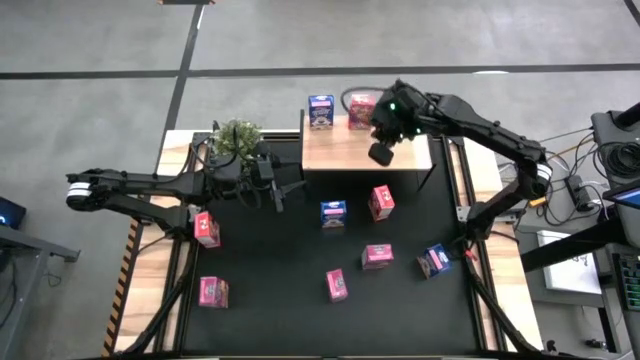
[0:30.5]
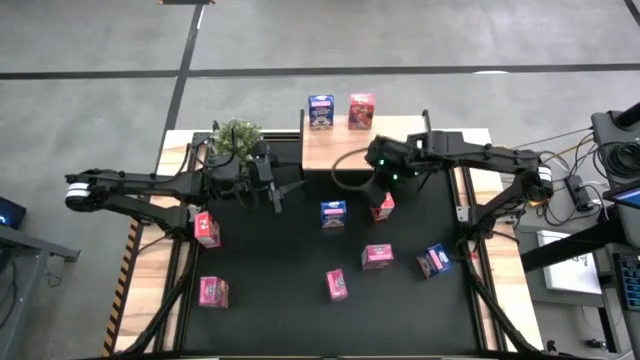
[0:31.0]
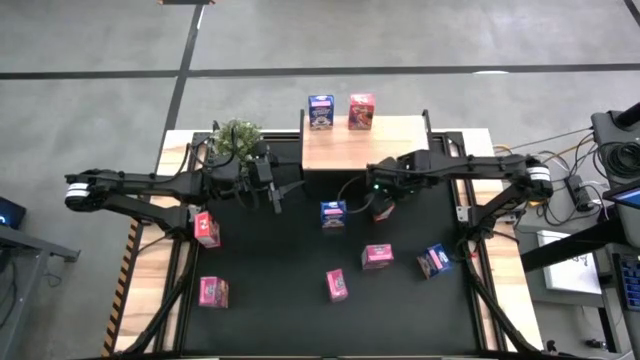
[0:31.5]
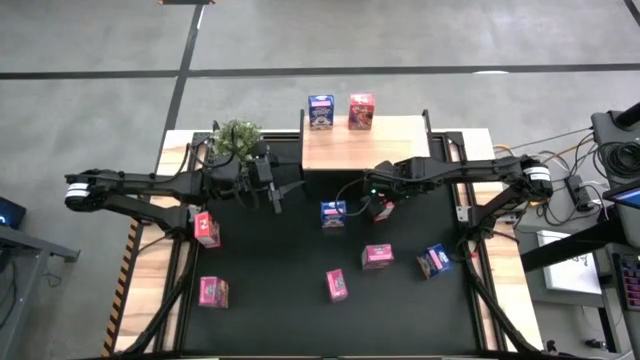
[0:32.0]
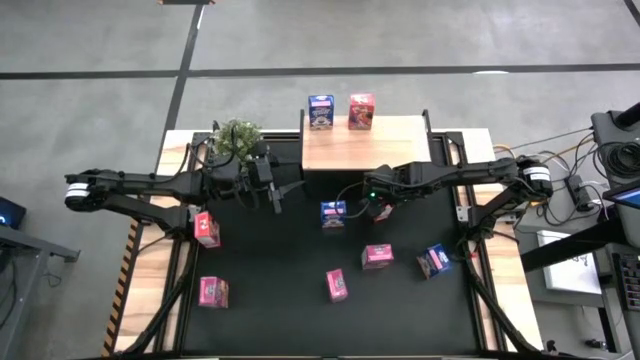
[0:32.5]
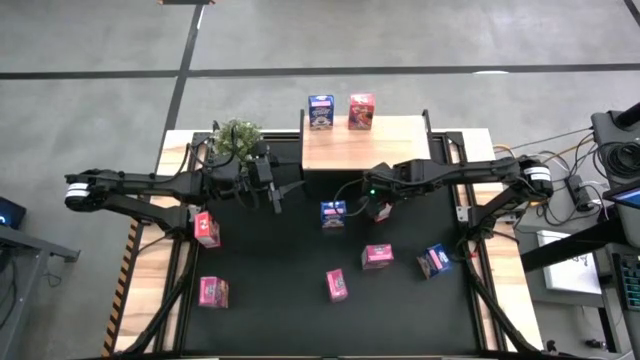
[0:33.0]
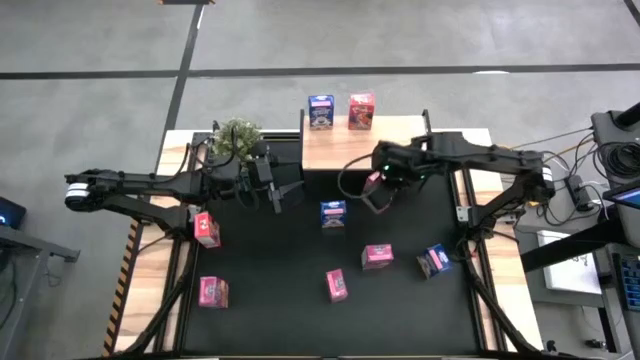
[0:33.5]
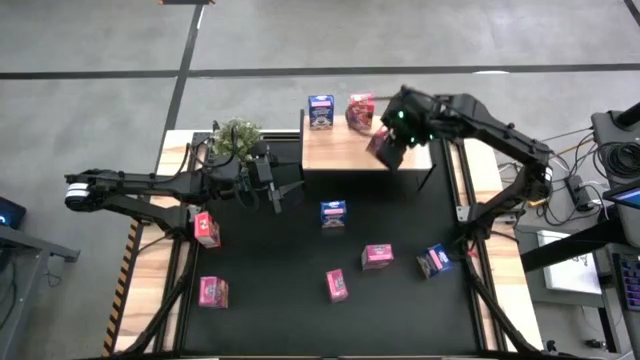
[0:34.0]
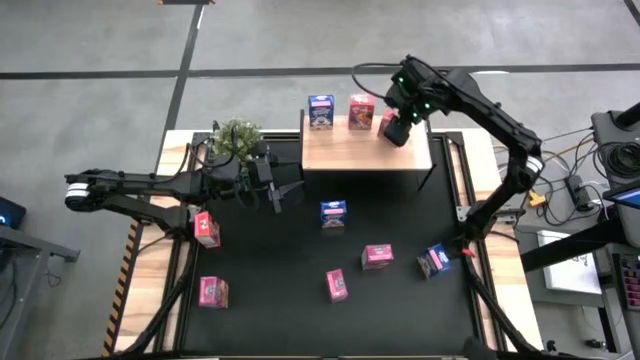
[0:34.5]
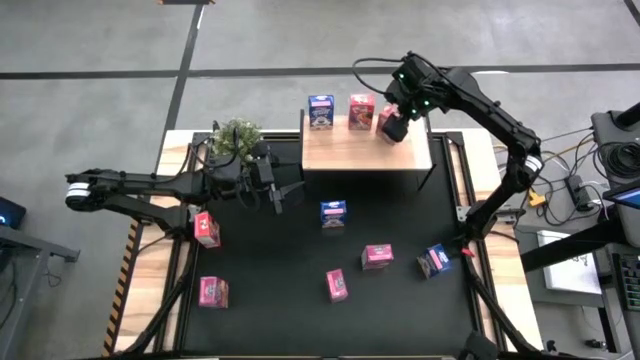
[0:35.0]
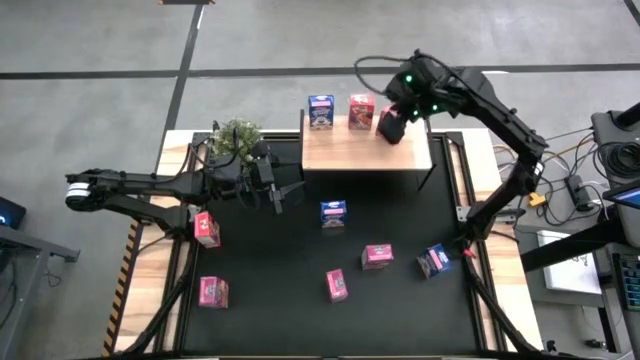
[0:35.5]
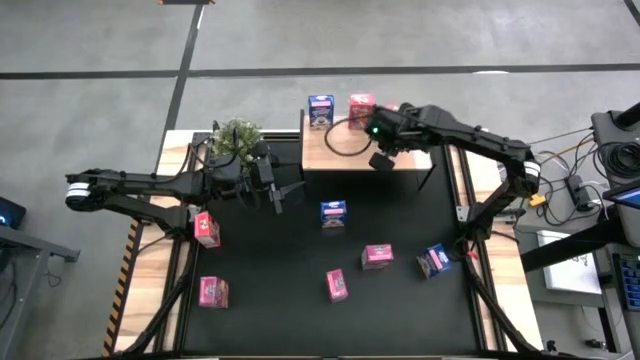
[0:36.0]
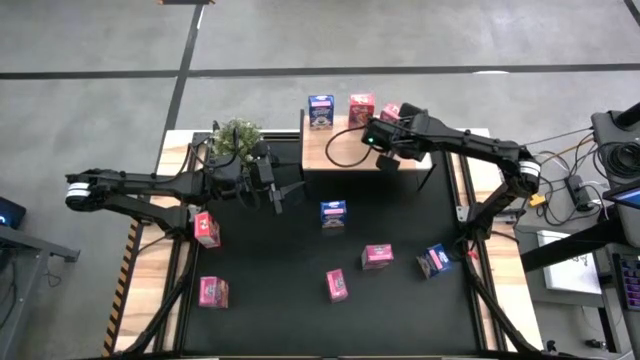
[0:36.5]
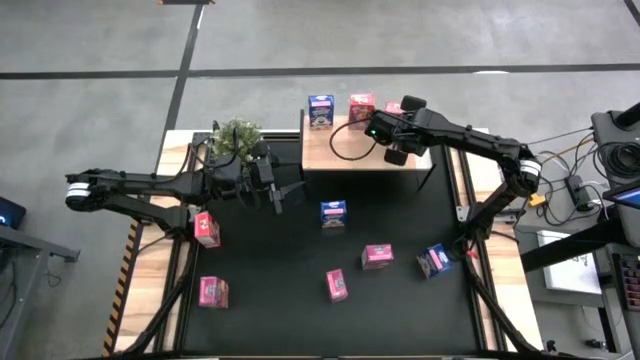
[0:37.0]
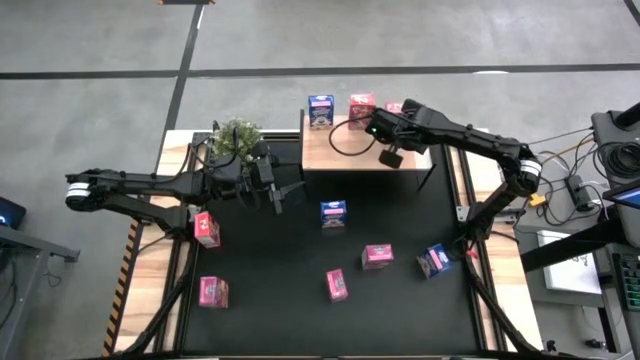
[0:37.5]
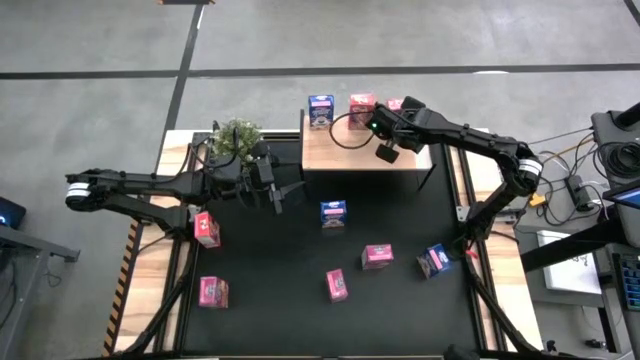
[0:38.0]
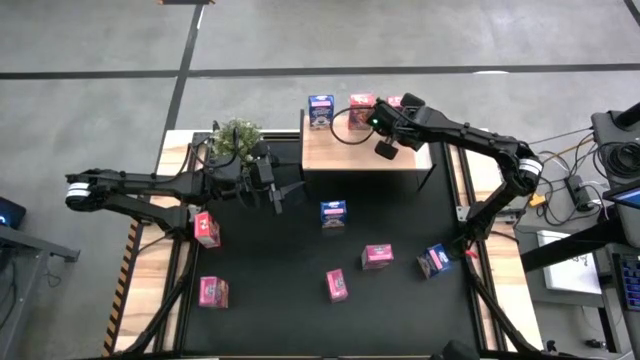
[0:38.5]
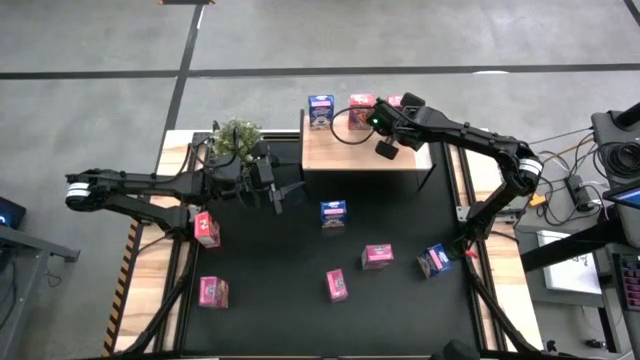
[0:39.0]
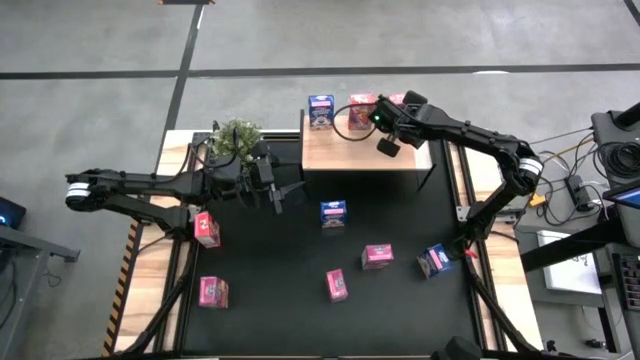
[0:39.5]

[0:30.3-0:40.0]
Task: Stack cereal on shelf
Put the right red cereal box on the shelf and align it with the other red cereal box on the shelf

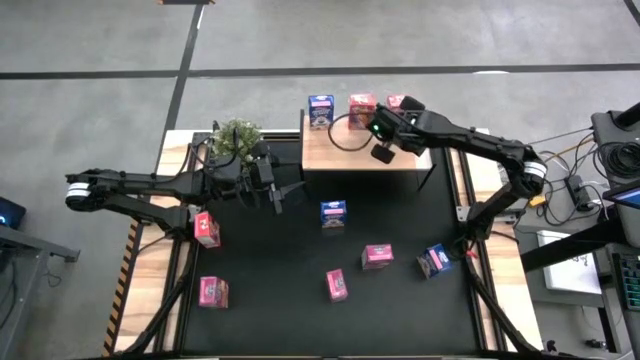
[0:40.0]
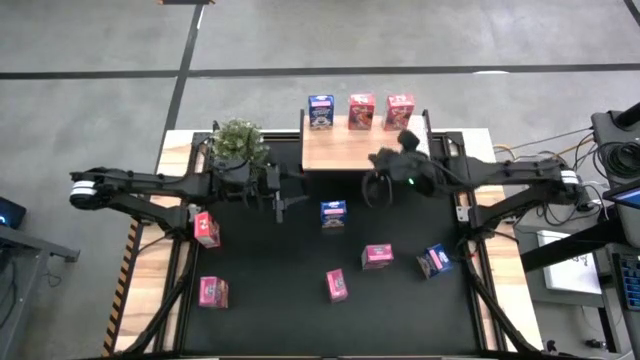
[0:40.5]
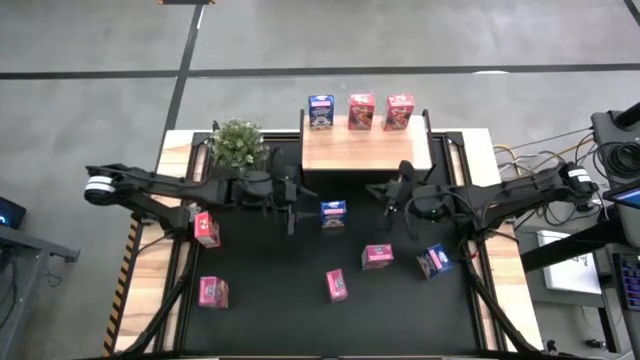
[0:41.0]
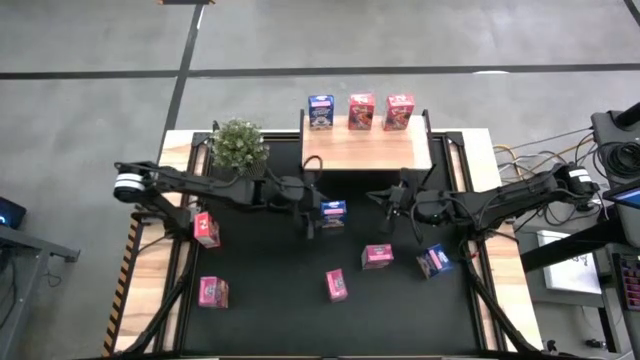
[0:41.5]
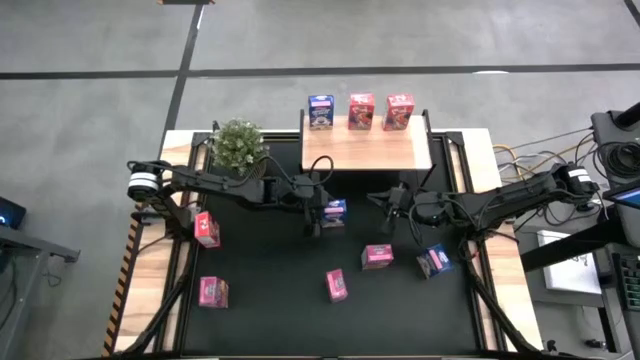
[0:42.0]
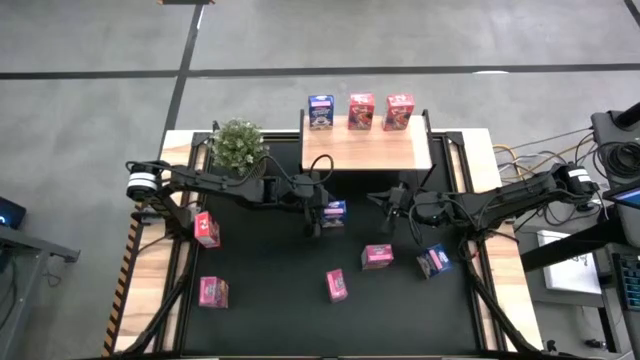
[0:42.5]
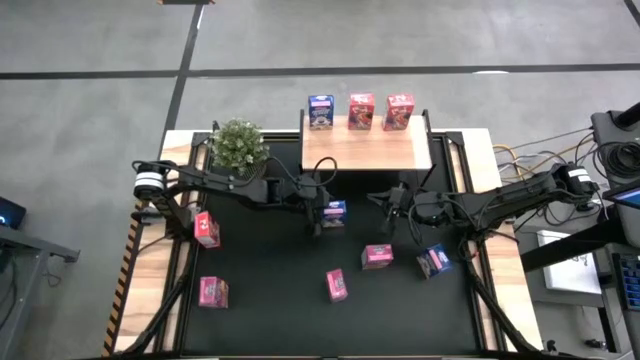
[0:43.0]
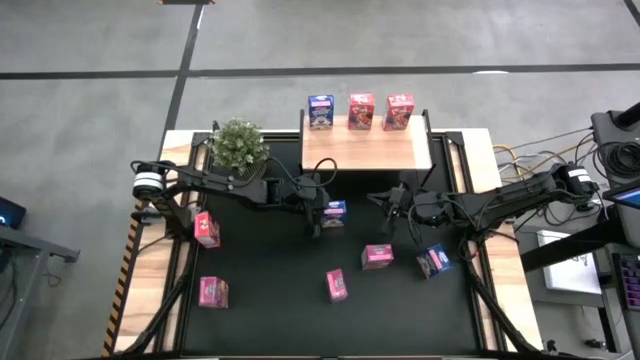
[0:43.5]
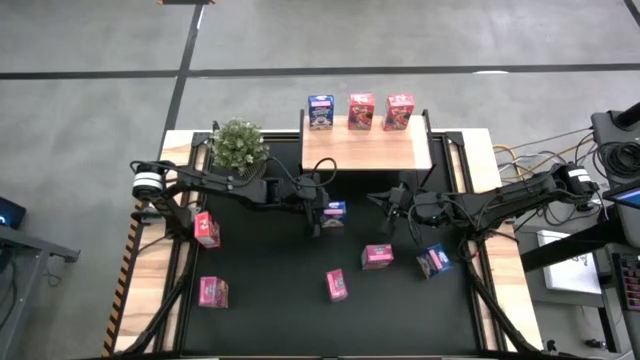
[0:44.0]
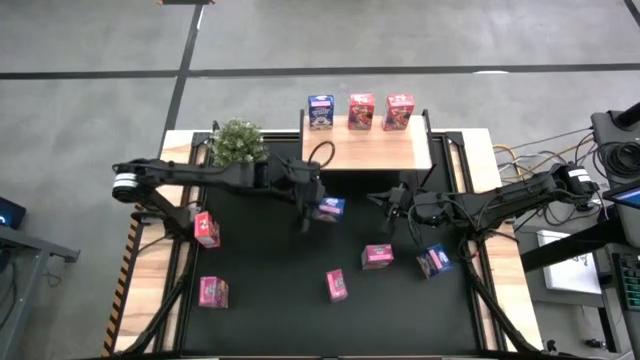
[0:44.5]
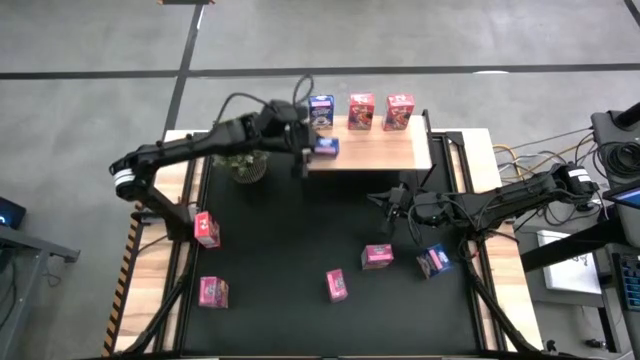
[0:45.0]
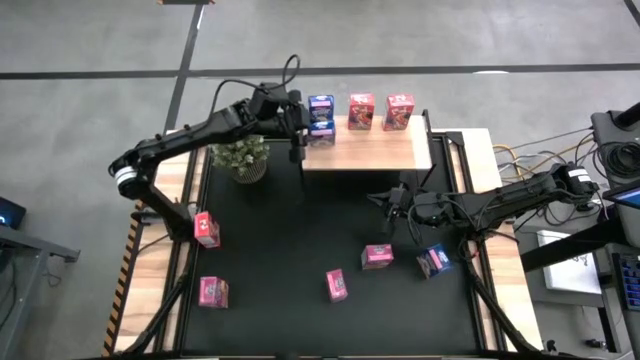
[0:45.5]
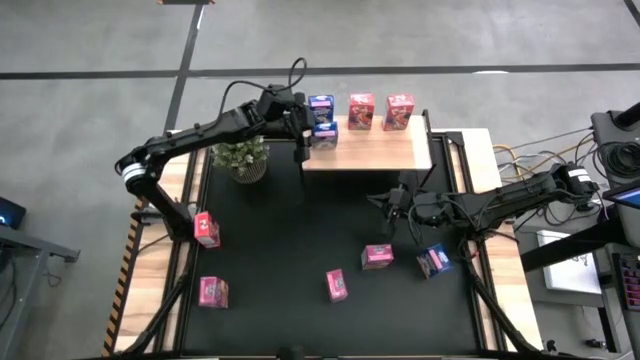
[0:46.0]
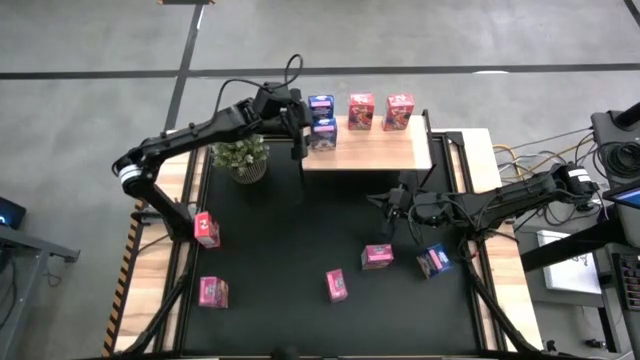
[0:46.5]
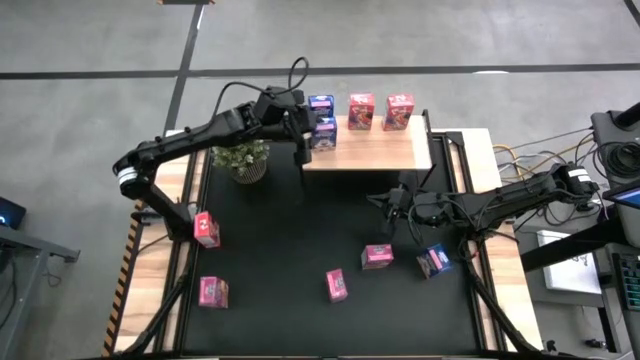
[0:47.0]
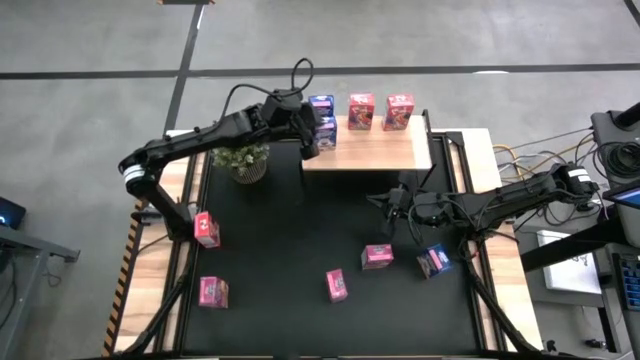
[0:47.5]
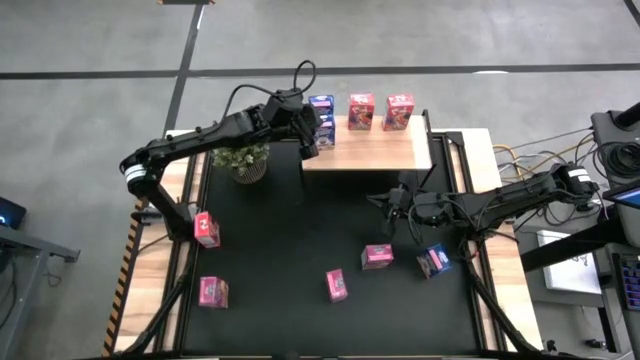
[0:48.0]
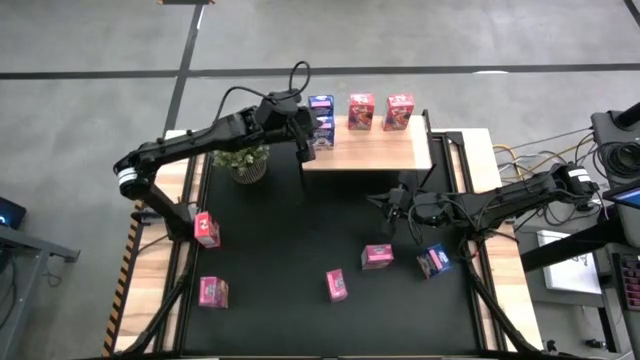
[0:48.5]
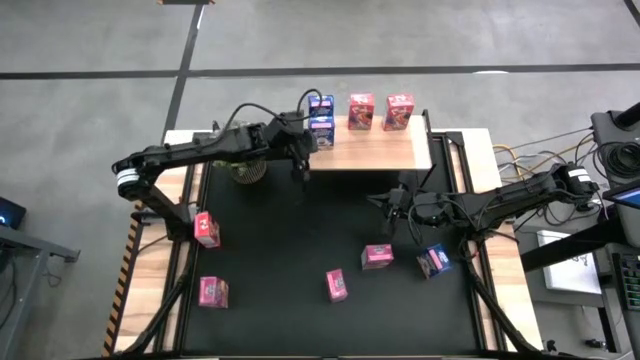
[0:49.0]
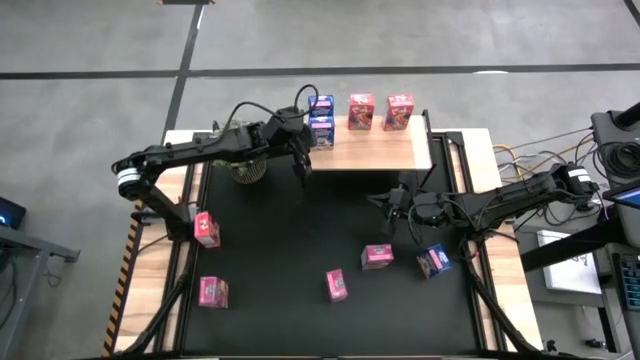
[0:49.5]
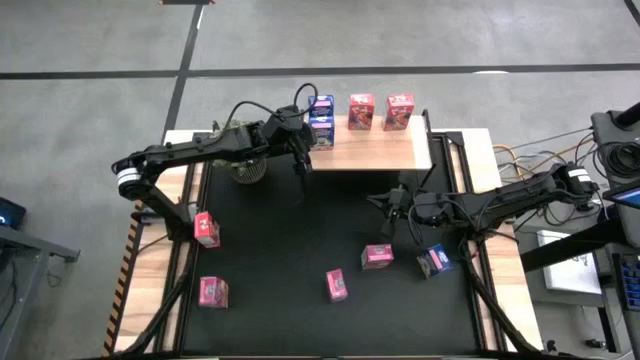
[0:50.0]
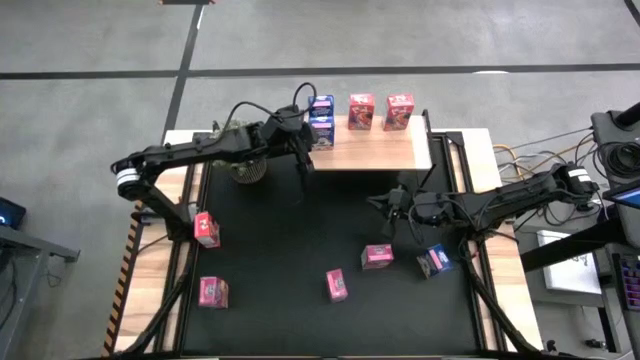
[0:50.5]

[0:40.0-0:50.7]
Put the left blue cereal box on the shelf and align it with the other blue cereal box on the shelf

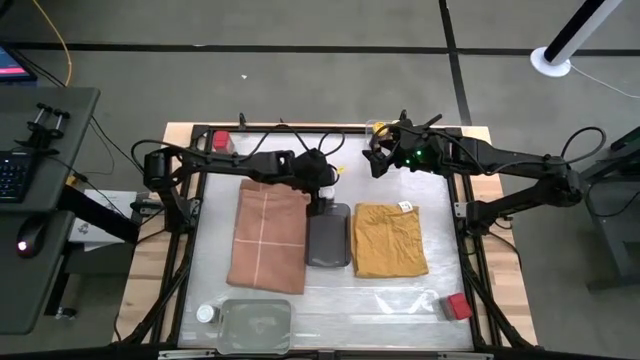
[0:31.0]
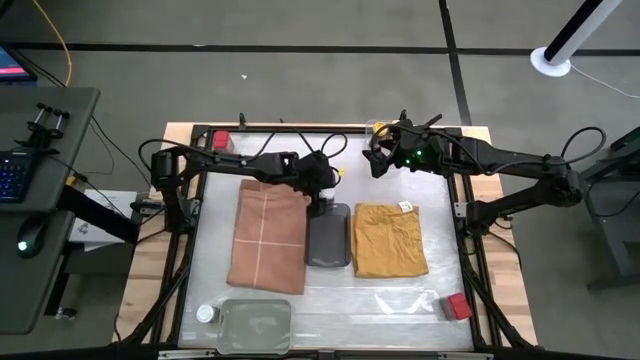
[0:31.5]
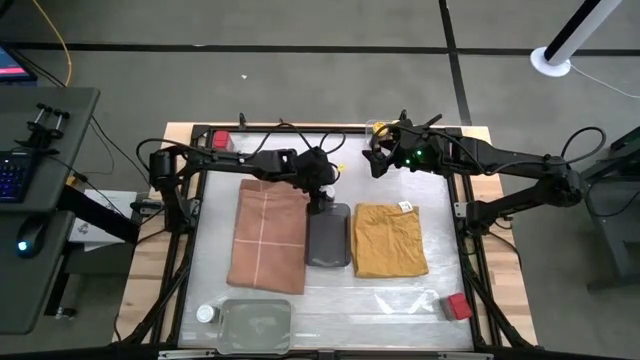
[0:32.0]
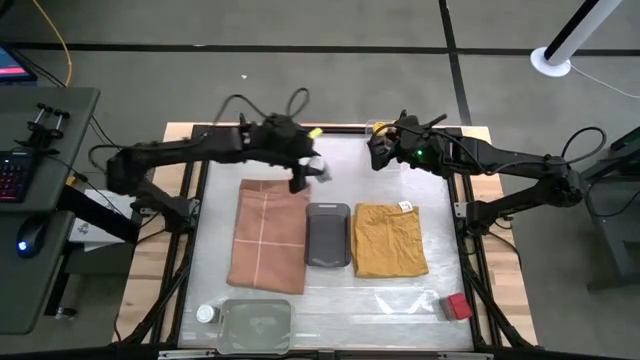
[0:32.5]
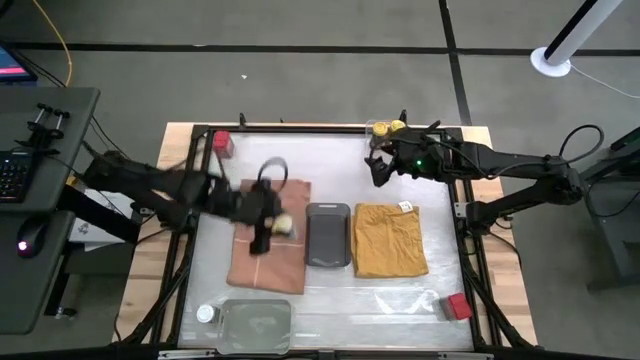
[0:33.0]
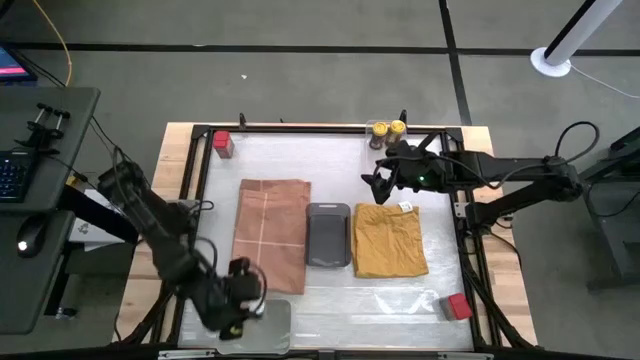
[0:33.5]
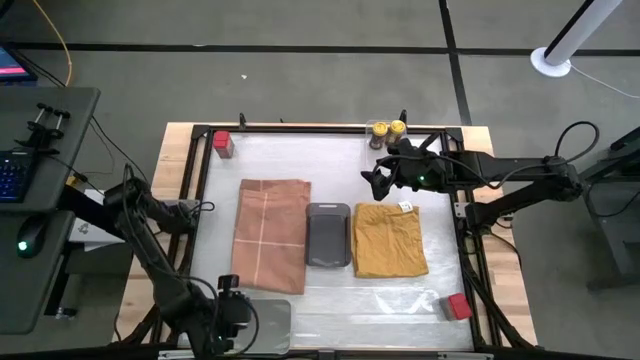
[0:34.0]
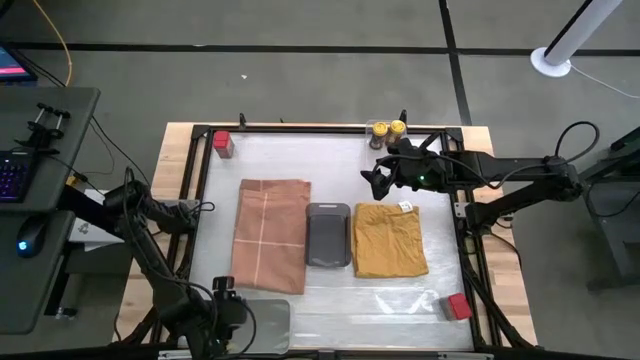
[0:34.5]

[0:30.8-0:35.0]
Task: Sort spices by type
Put the top white seasoning bottle into the white bin
